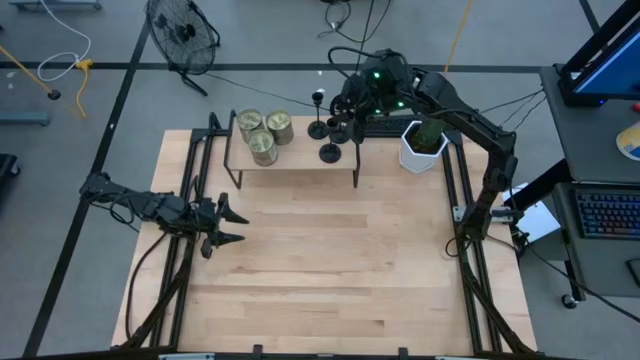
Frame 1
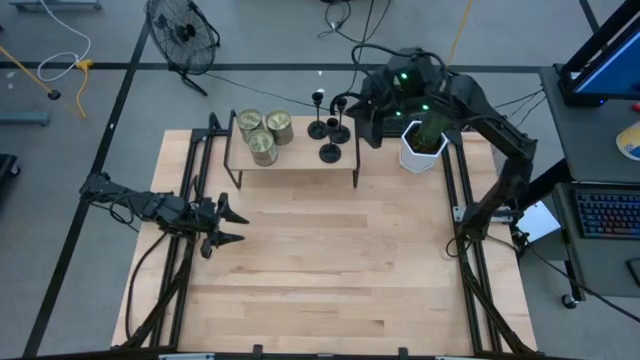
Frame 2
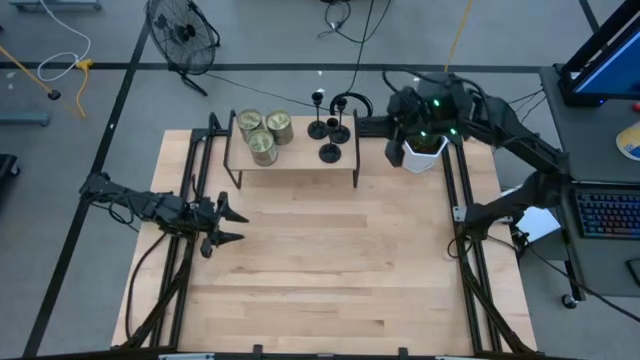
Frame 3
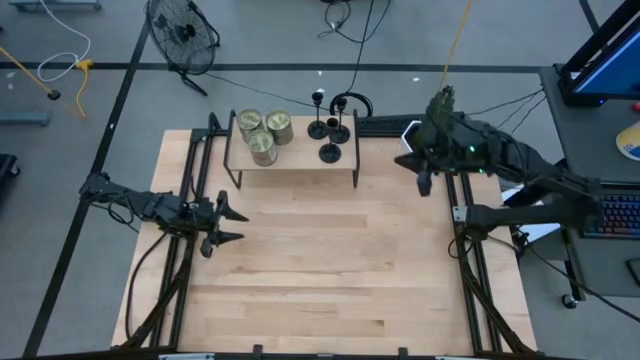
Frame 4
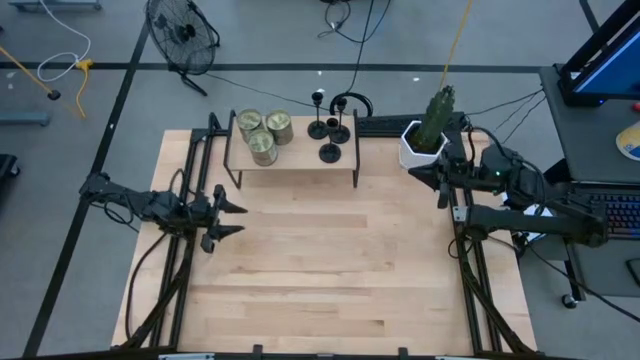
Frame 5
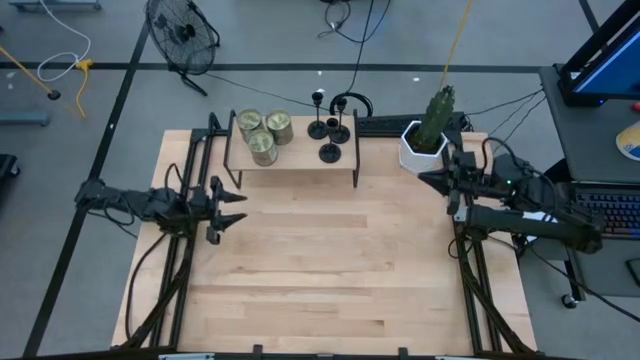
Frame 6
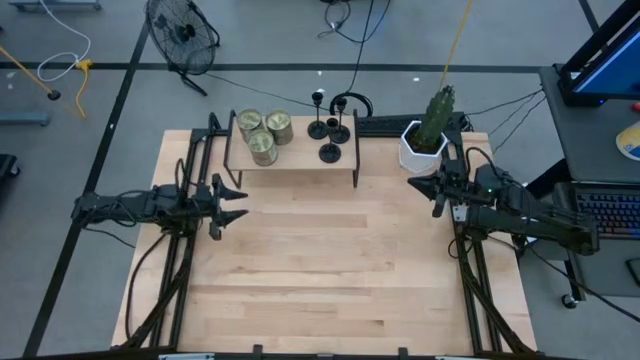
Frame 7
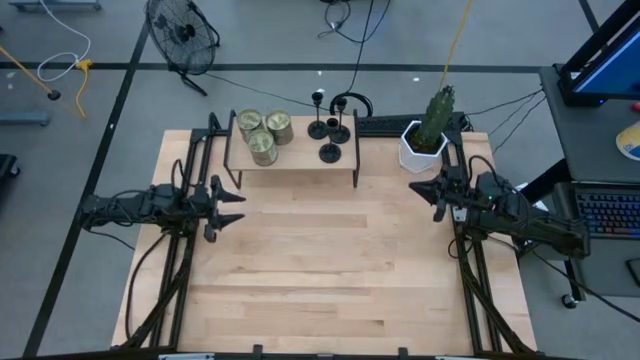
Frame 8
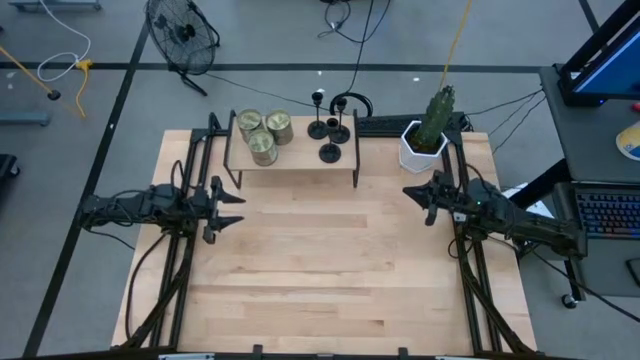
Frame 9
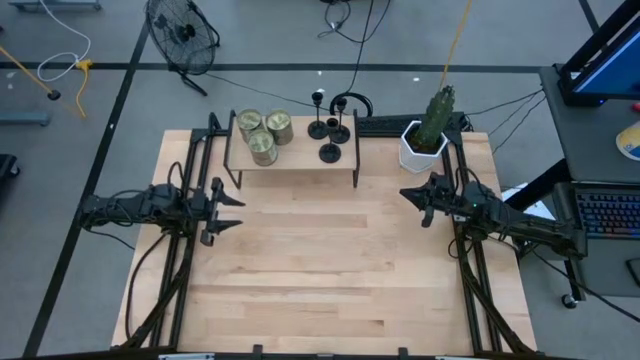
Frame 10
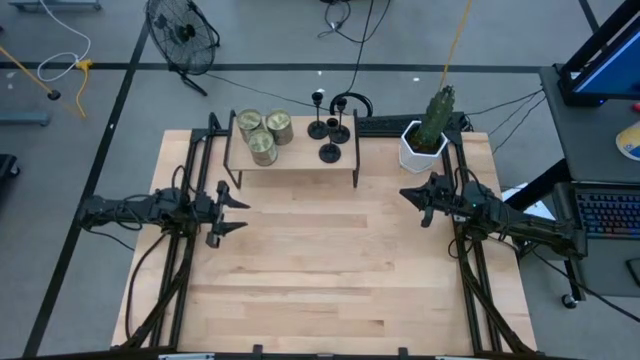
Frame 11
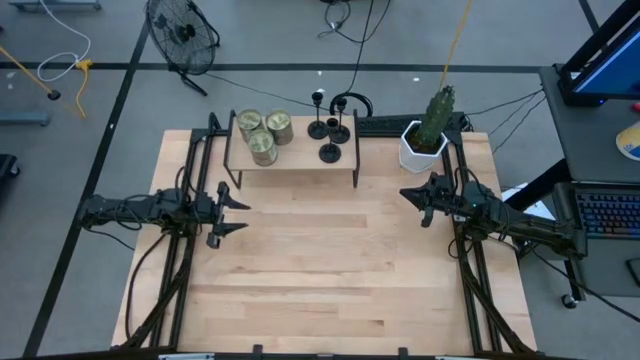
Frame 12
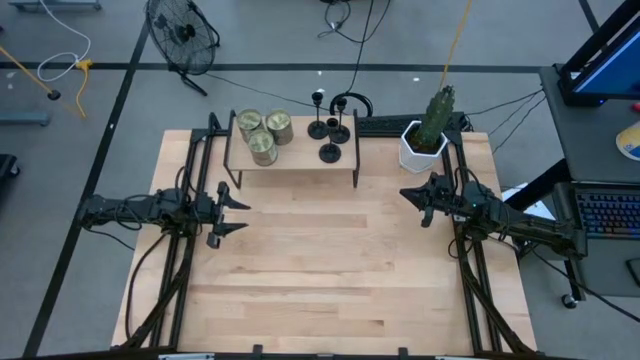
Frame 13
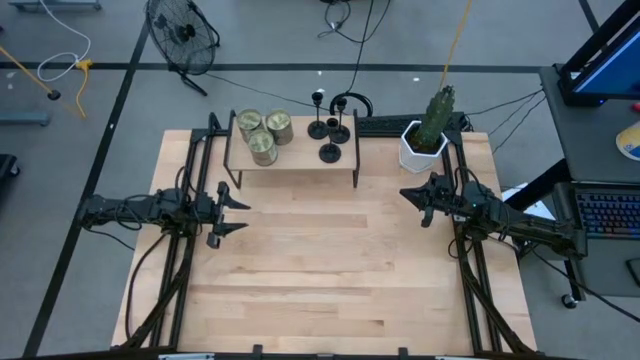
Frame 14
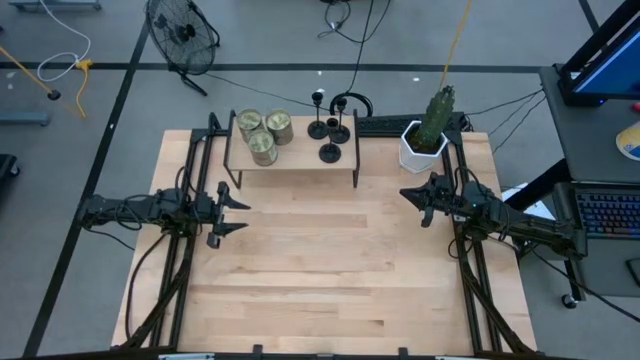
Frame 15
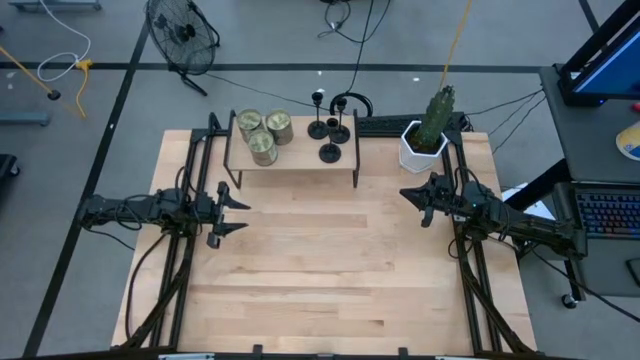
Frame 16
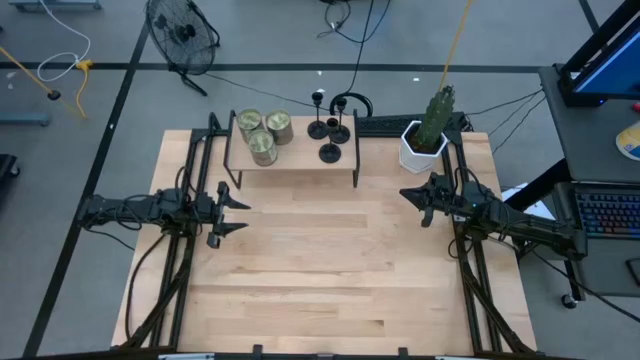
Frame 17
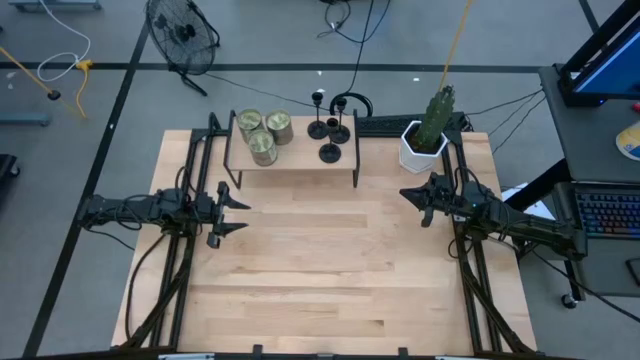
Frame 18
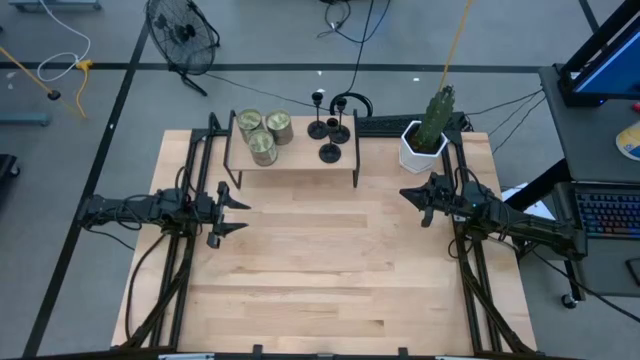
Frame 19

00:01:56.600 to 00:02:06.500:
Task: Pick & Place candle stick holders
Return to Home Position

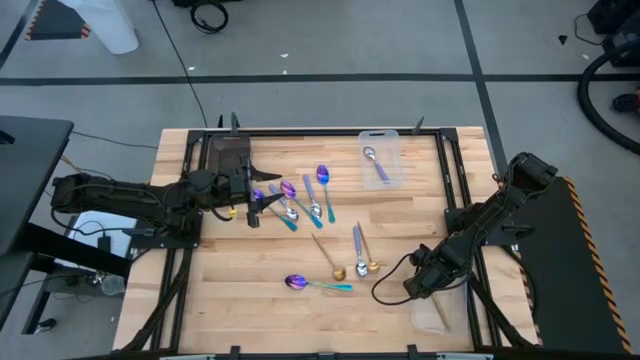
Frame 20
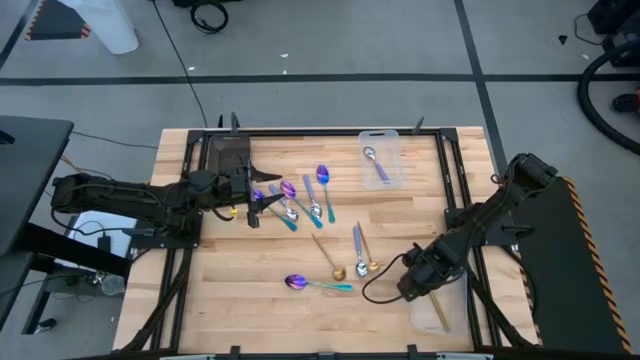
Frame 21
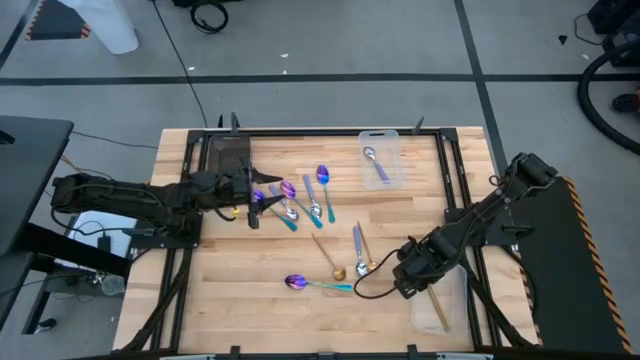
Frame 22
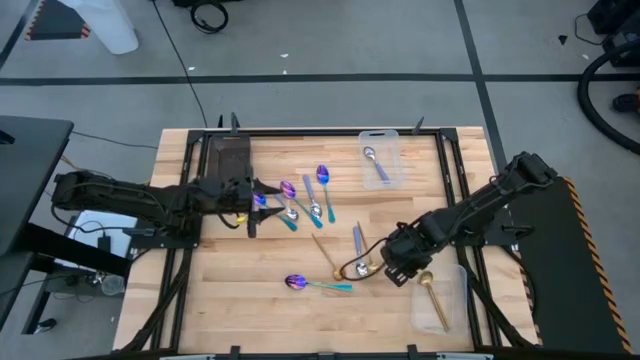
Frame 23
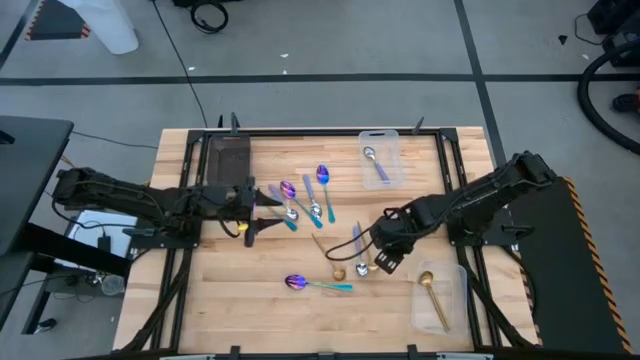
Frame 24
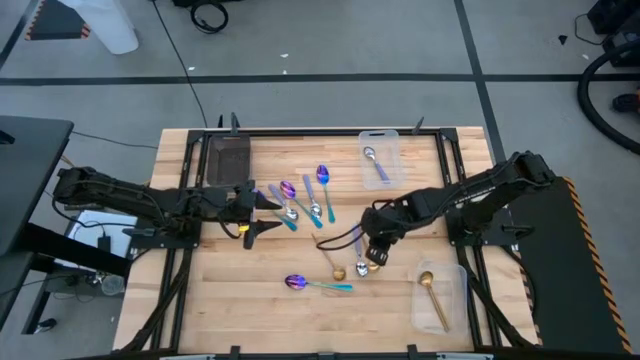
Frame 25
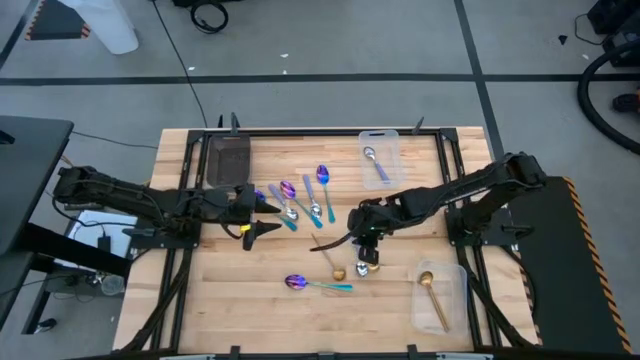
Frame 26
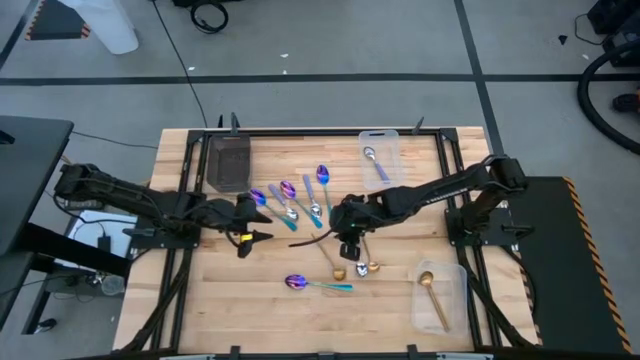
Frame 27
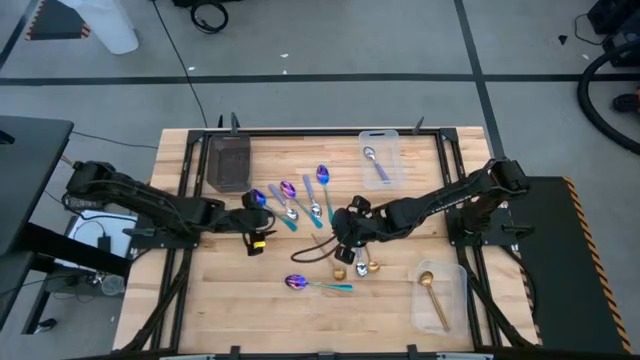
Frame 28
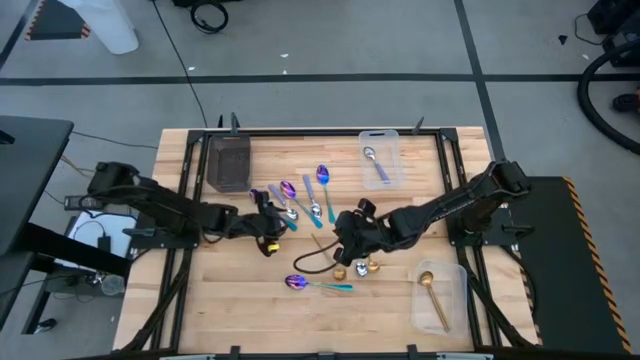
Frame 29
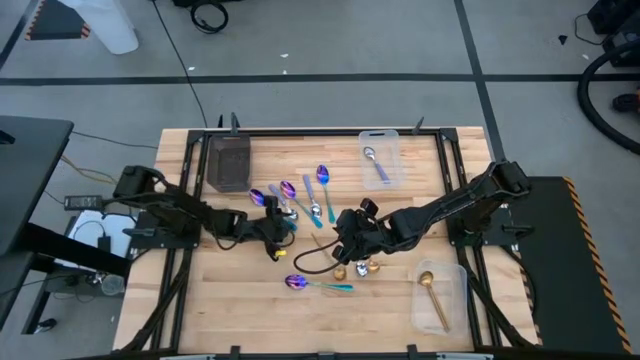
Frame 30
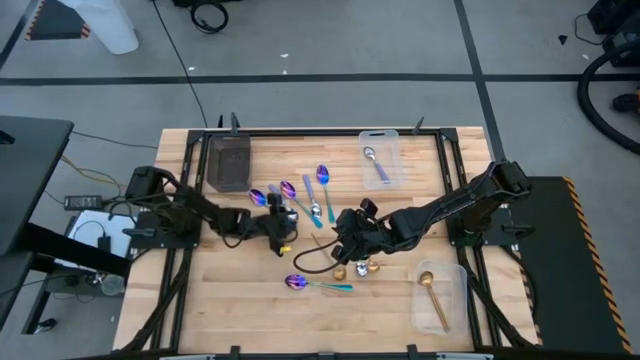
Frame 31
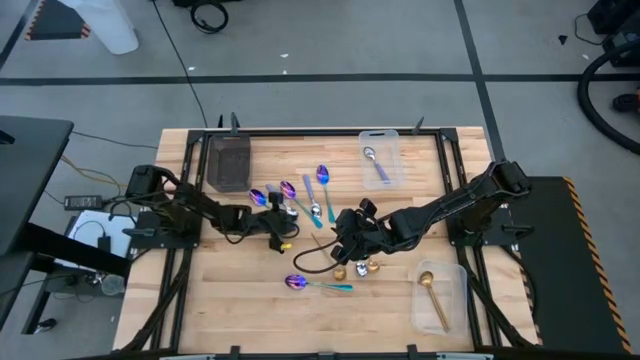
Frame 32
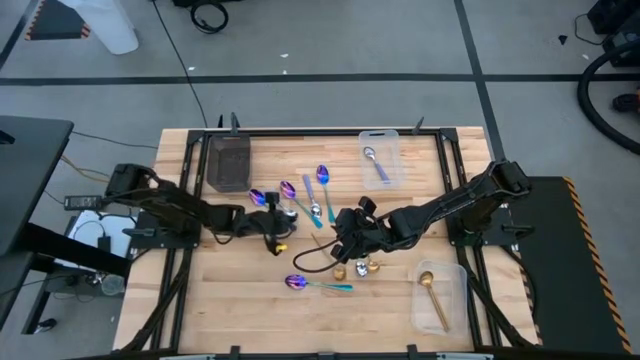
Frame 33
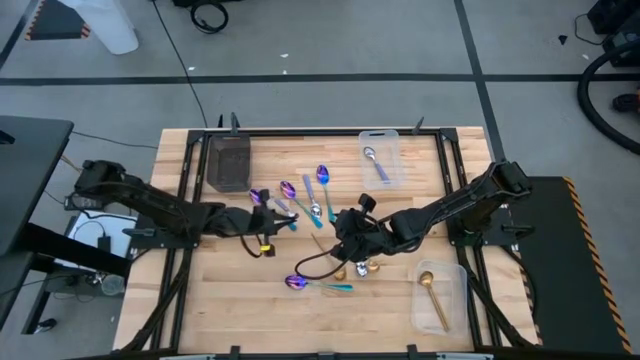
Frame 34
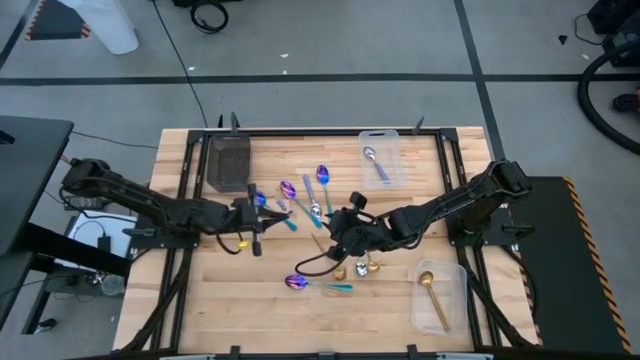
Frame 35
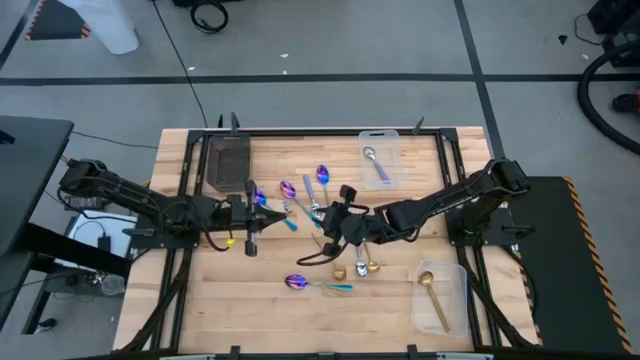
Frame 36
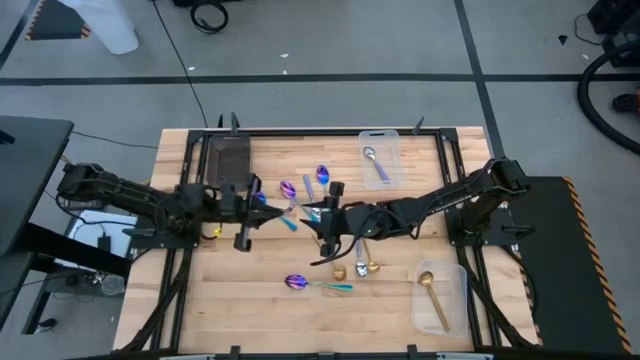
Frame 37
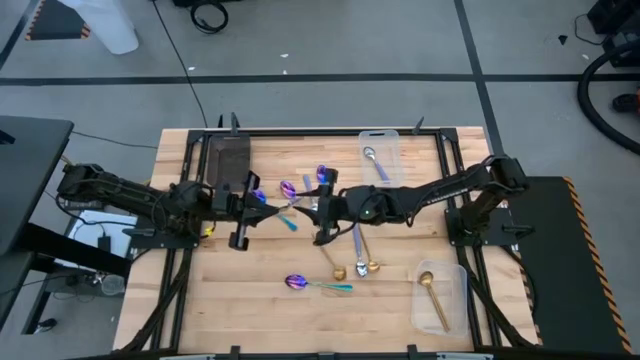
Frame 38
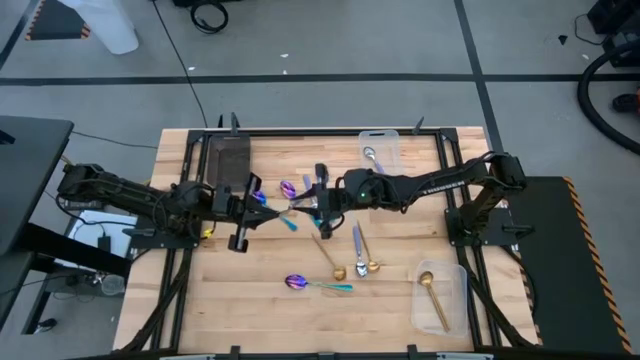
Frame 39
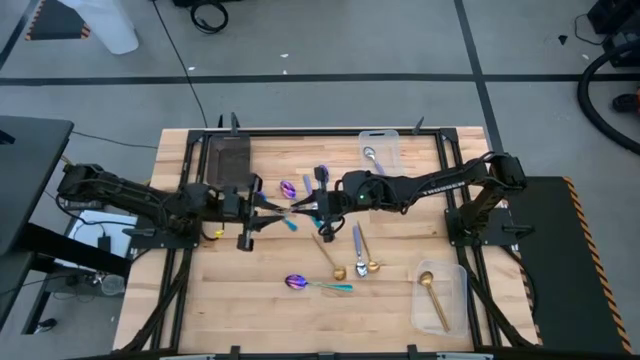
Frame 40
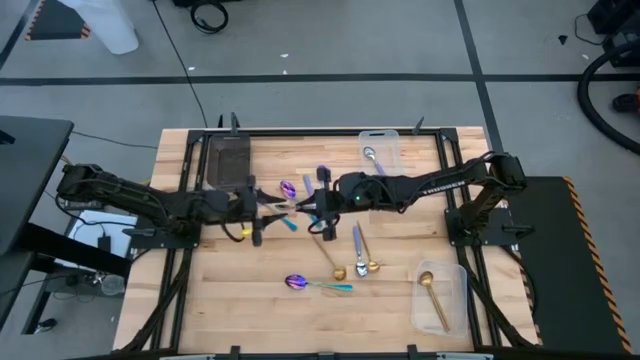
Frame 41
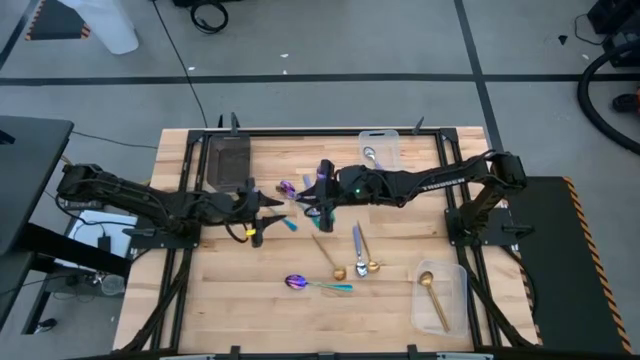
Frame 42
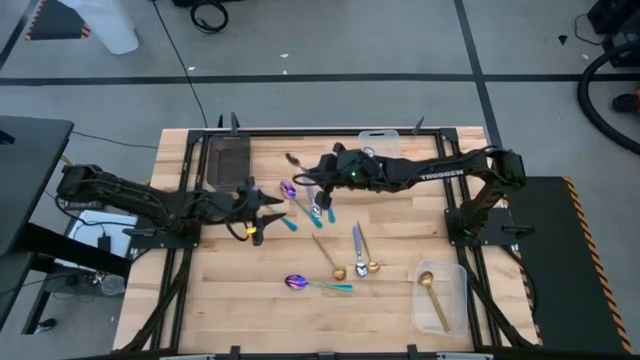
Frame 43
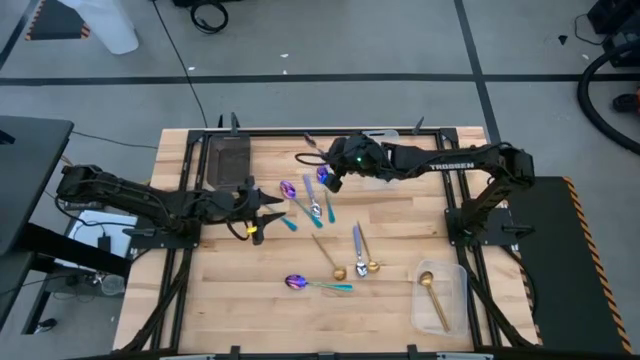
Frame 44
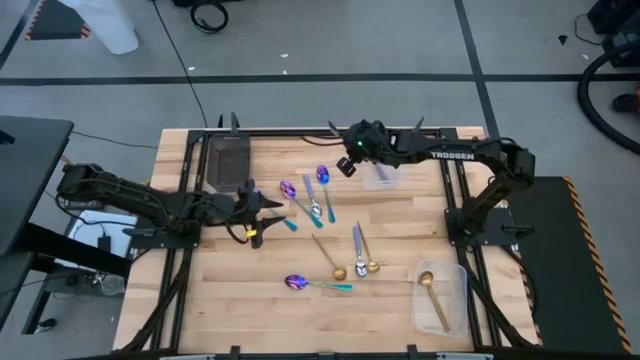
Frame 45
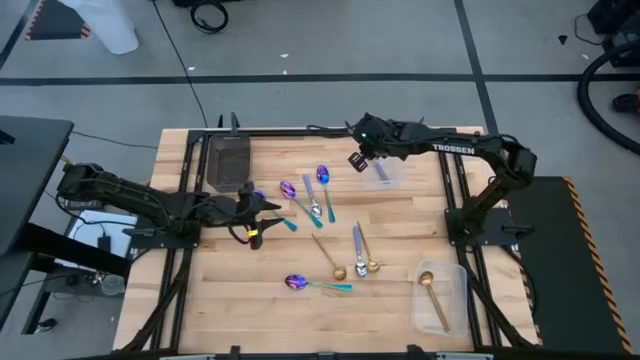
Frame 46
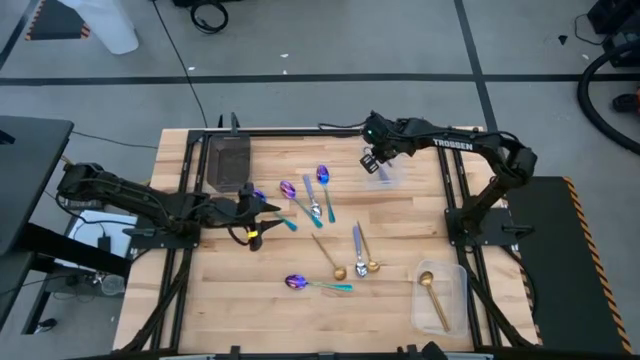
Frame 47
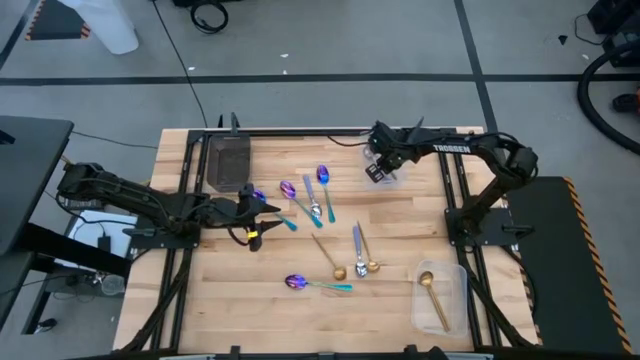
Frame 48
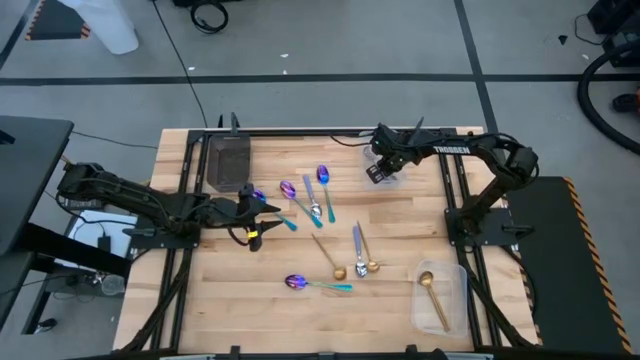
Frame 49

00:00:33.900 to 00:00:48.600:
Task: Sort silverware by color (type)
Put the purple spoon into the bottom transparent bin
